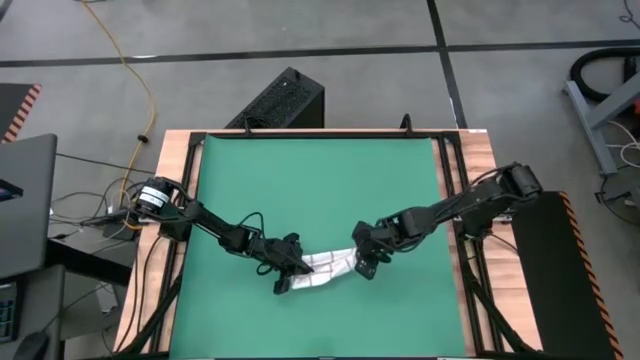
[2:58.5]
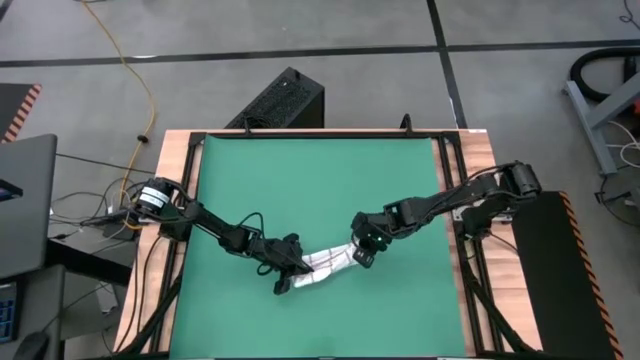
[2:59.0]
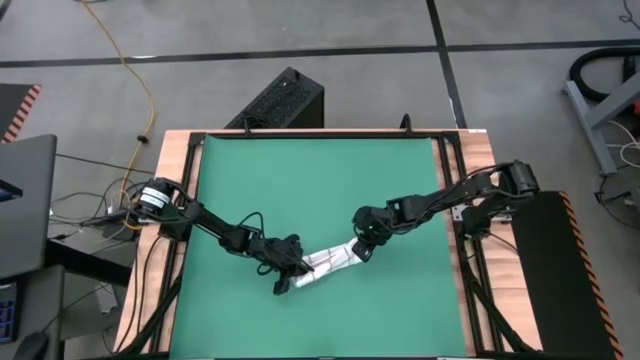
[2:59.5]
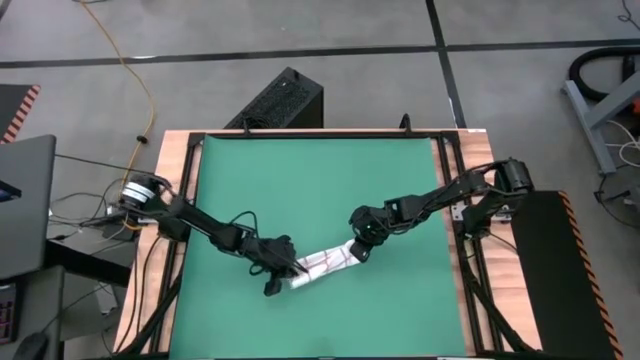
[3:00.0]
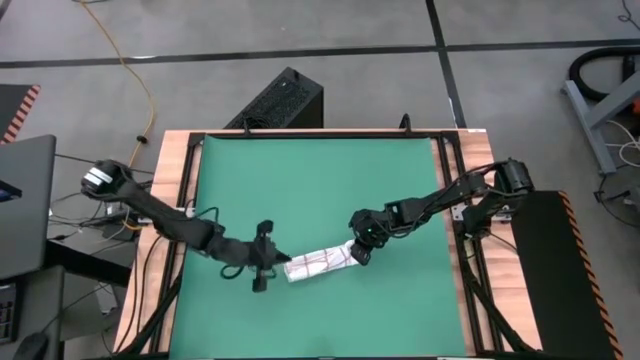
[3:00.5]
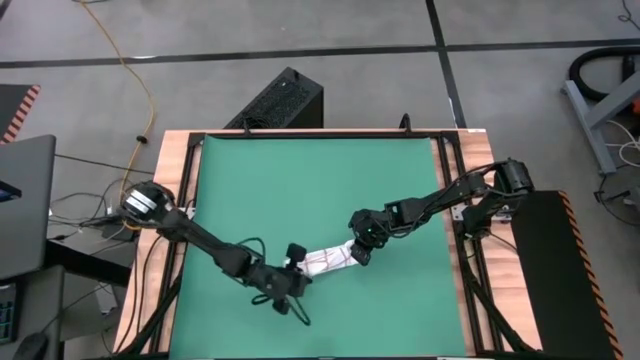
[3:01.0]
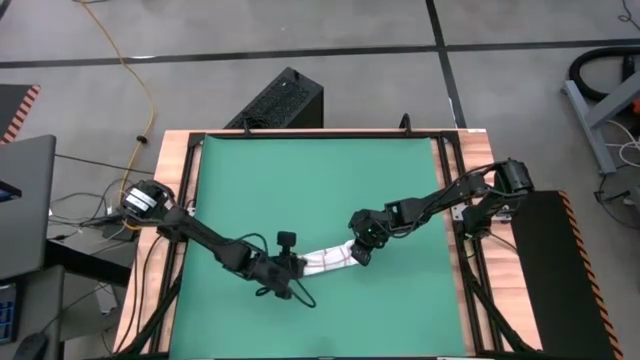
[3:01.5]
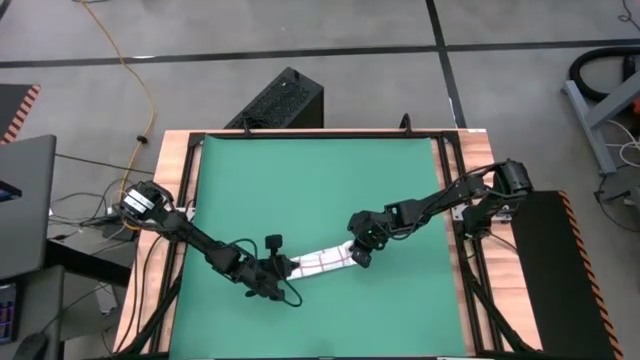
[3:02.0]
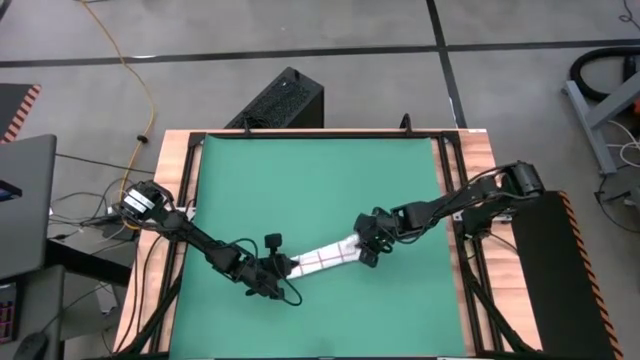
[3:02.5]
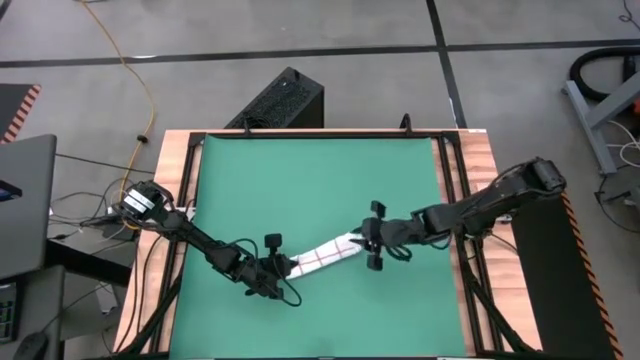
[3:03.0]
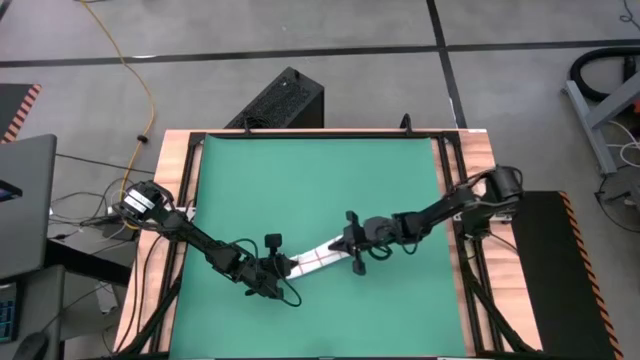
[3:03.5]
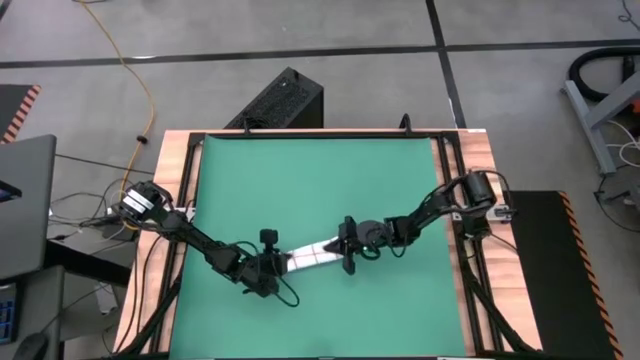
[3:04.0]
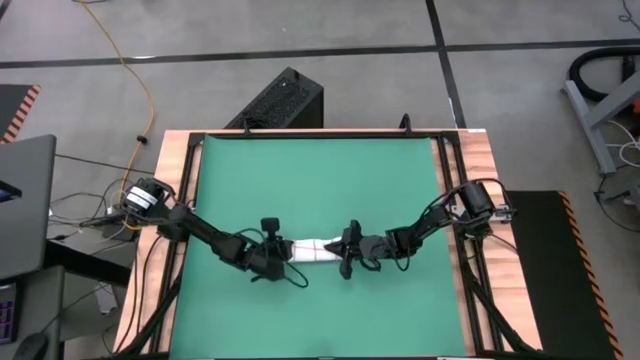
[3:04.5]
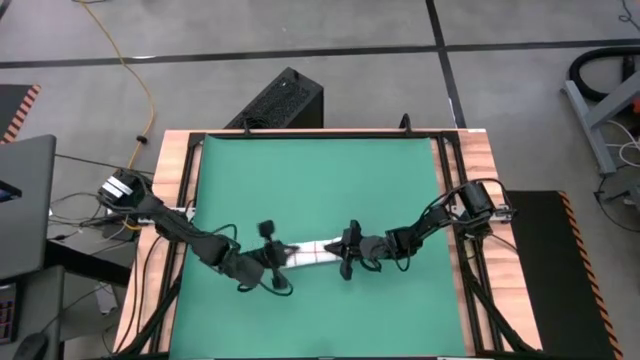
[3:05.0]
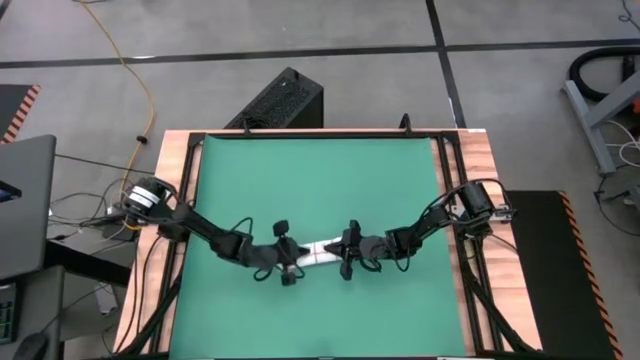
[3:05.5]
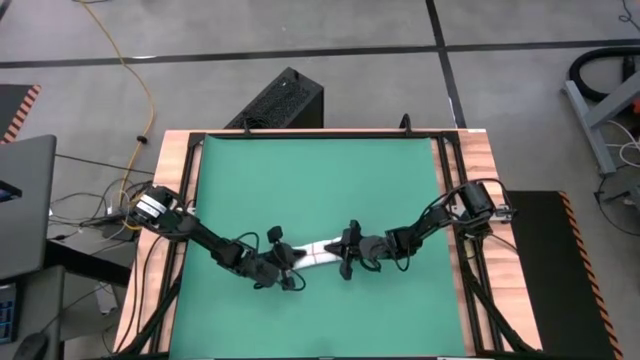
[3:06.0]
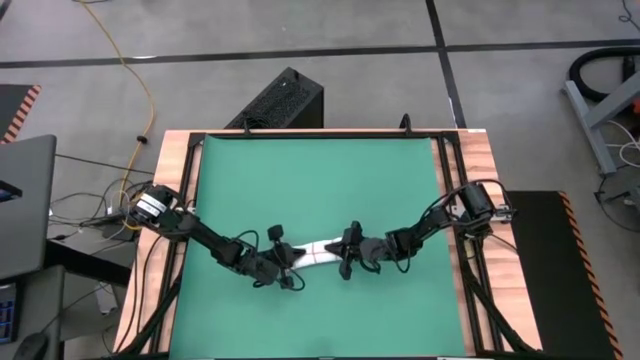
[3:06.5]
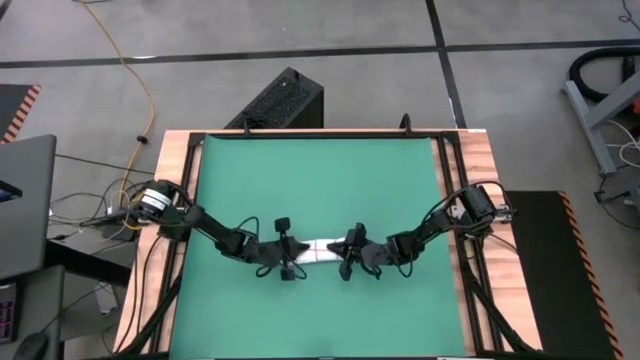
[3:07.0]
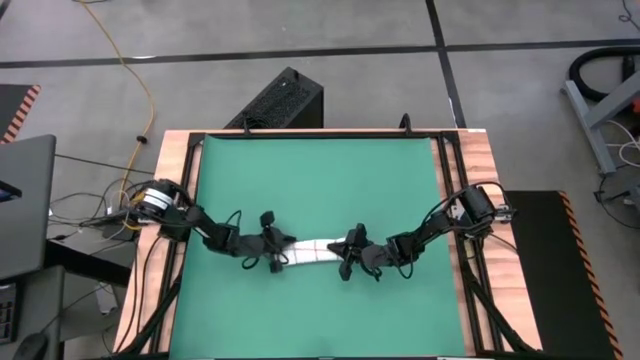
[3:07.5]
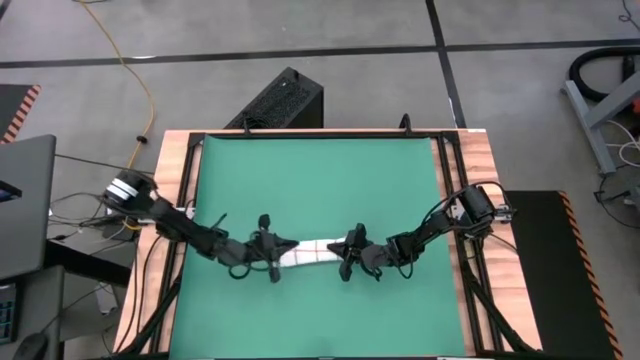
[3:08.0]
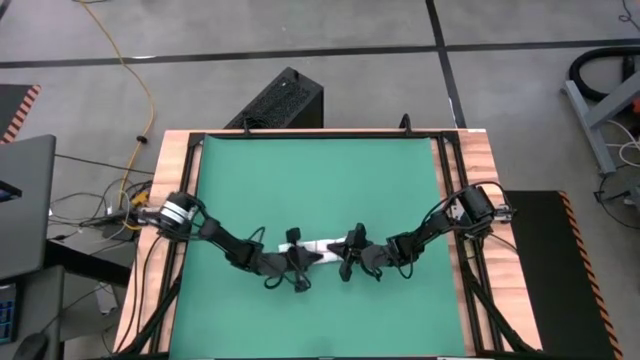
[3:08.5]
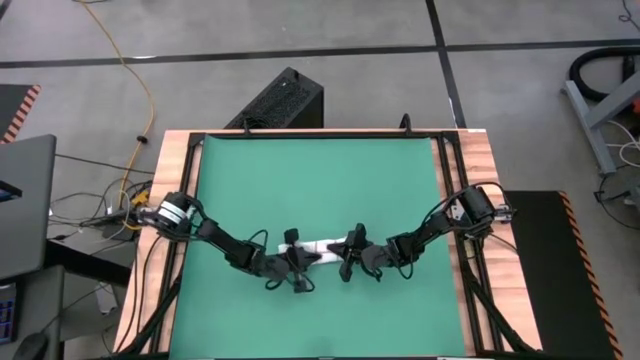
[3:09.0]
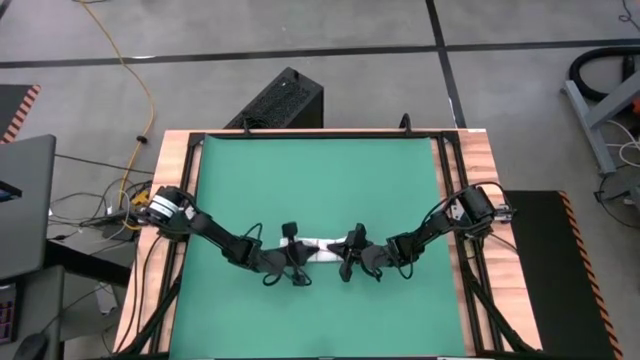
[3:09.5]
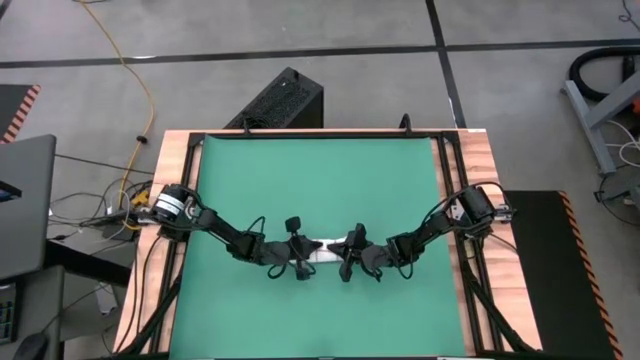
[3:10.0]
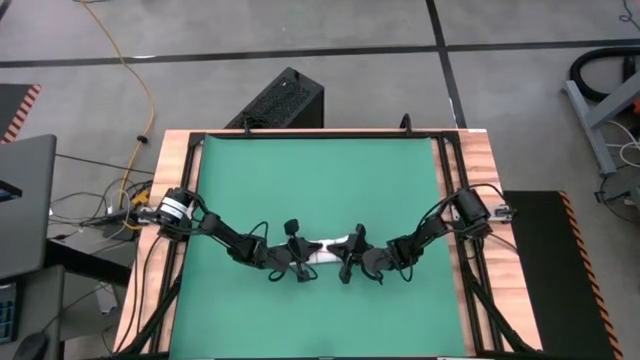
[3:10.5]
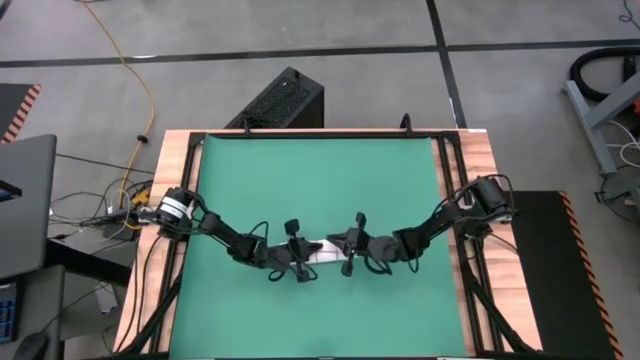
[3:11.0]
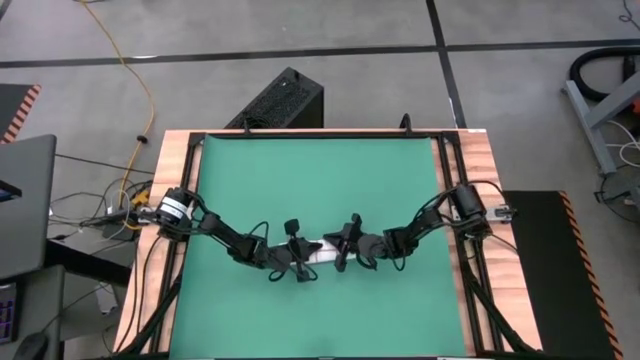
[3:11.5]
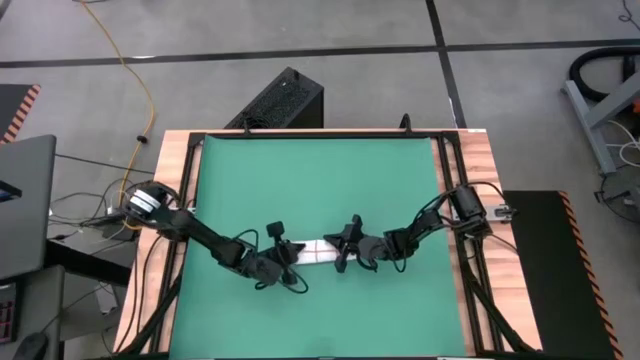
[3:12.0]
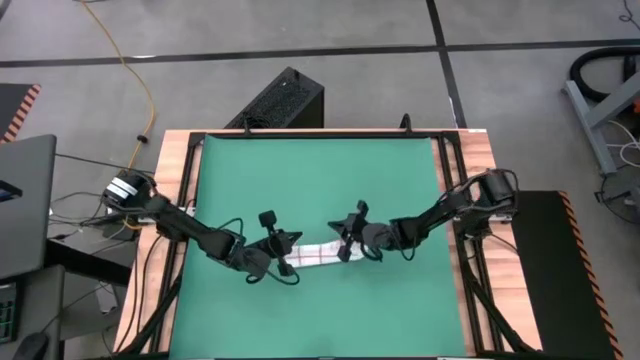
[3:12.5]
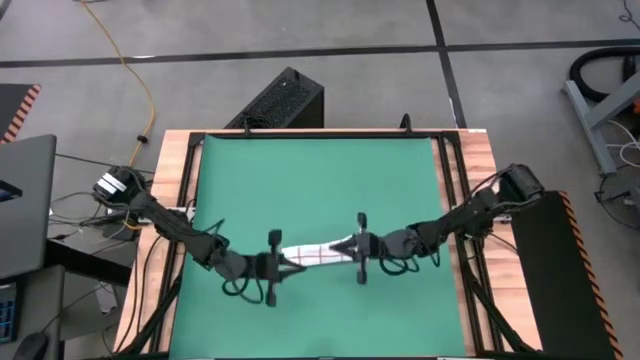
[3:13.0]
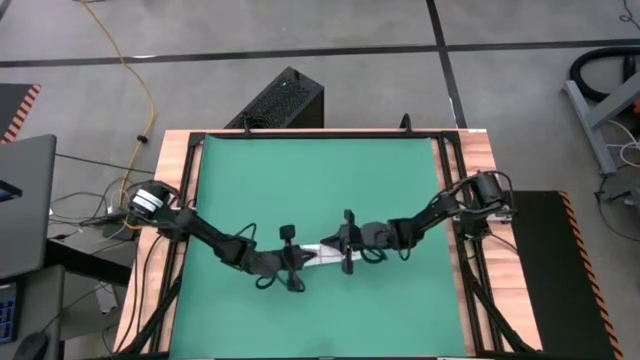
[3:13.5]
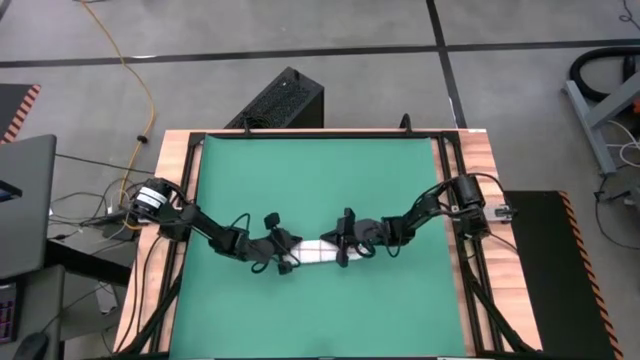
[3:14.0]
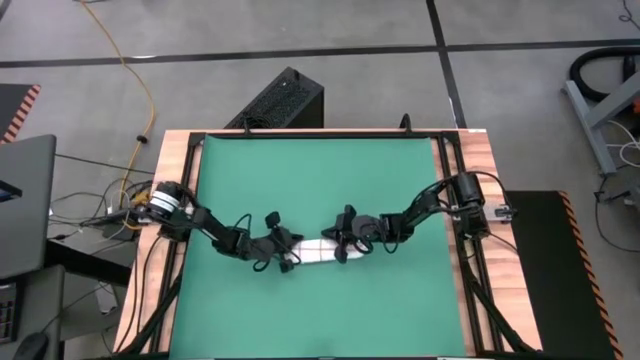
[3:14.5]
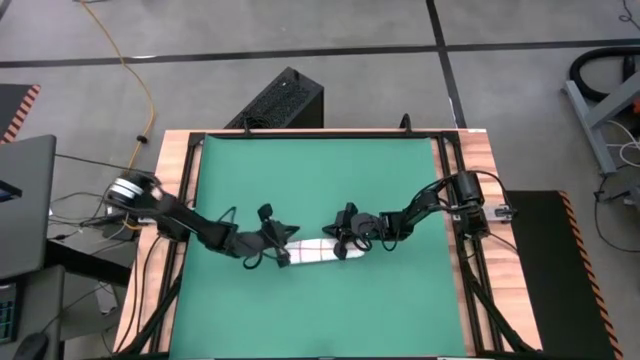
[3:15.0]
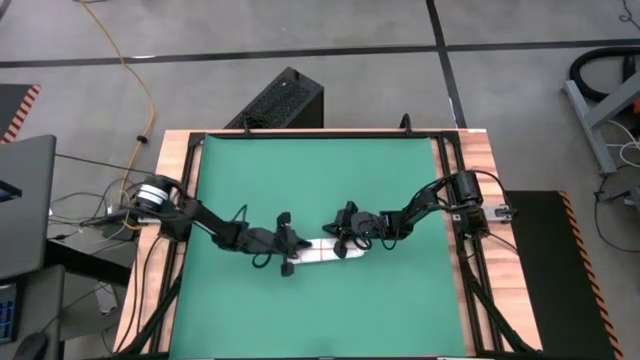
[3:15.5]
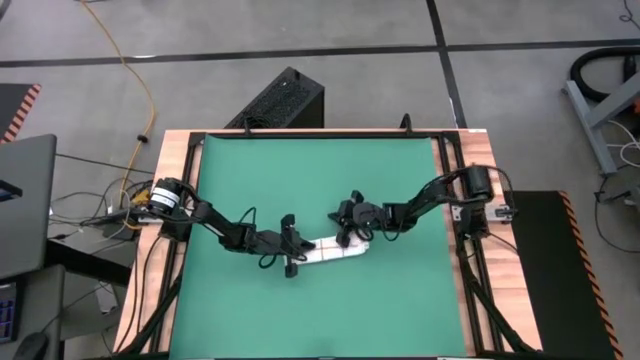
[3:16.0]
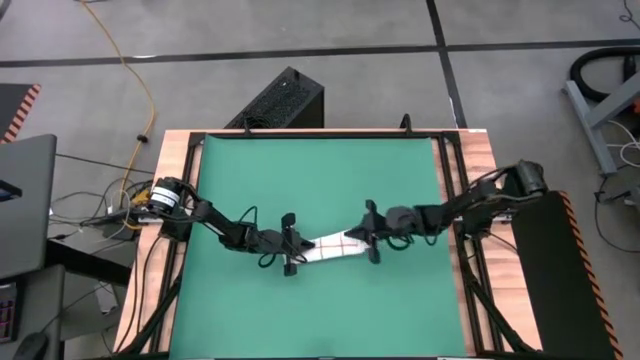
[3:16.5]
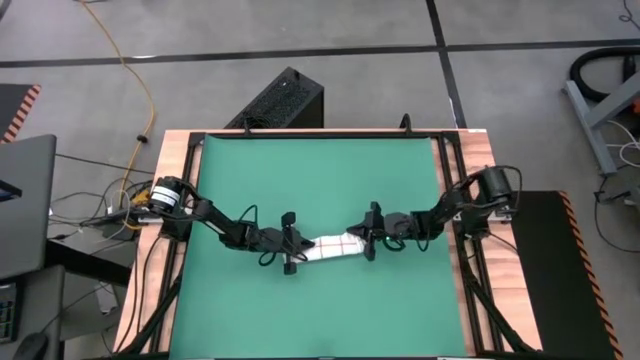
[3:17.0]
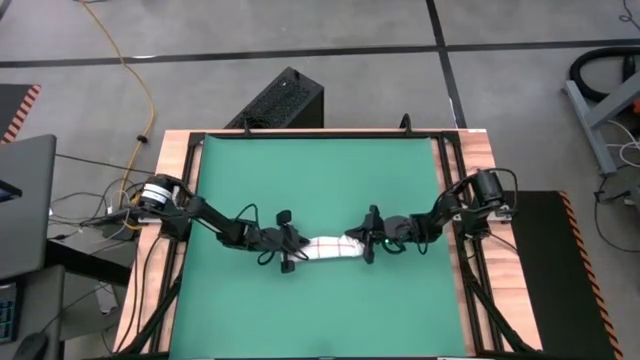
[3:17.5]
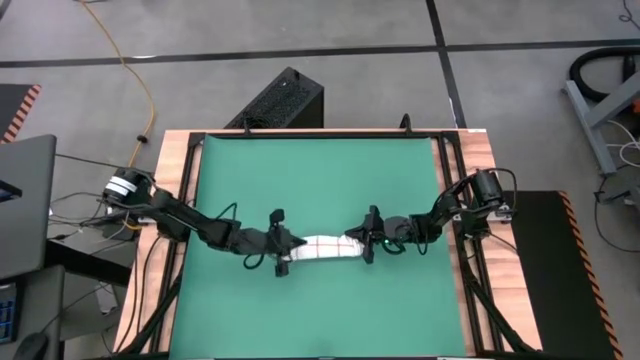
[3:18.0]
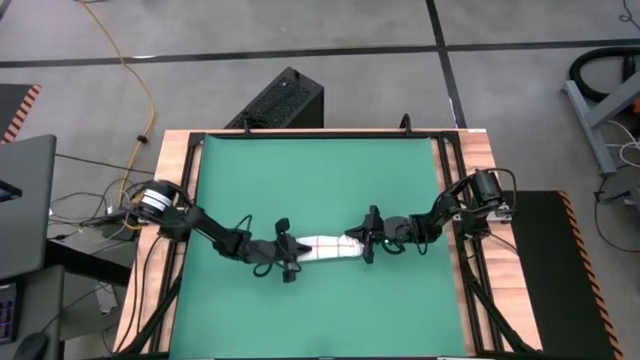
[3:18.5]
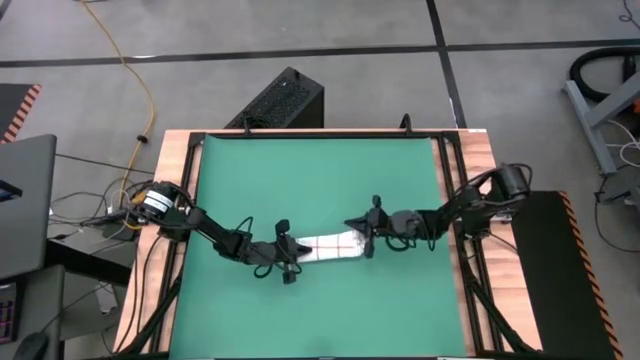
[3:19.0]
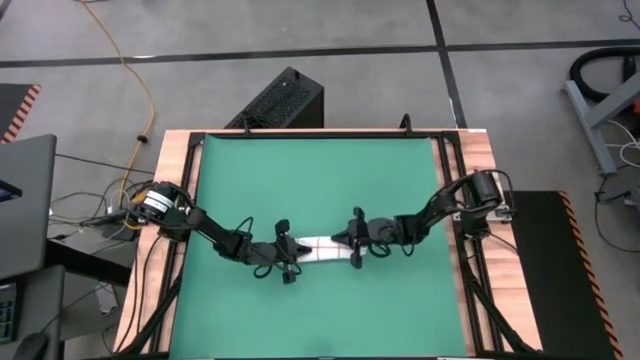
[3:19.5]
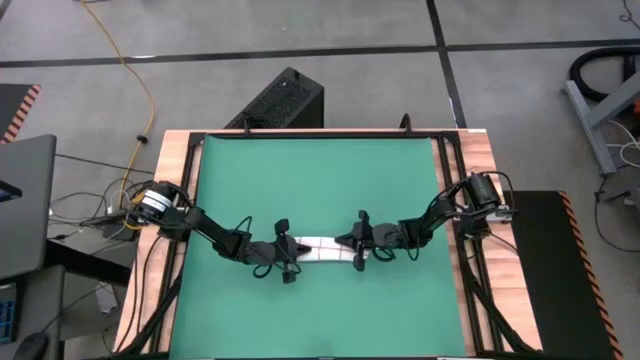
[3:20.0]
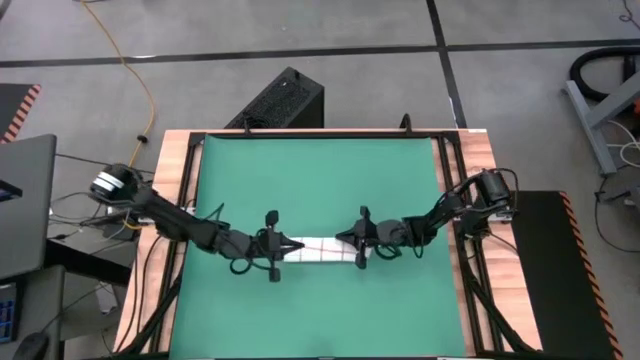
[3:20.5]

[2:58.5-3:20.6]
Task: Roll towel into tight, uniform cylinder
Roll the kitchen towel on the table
